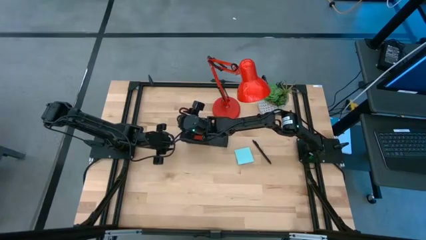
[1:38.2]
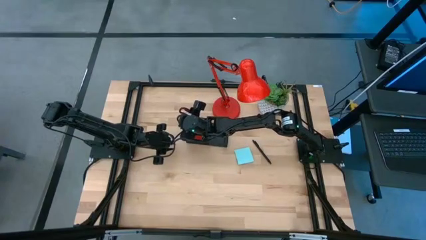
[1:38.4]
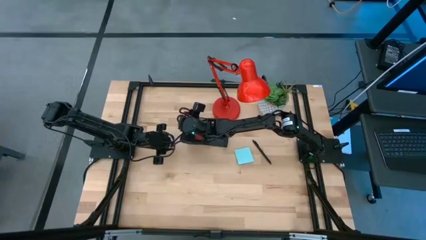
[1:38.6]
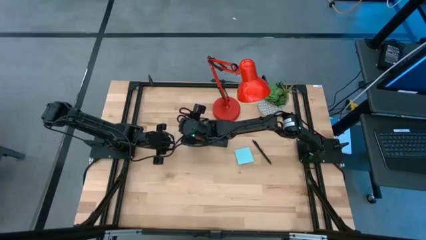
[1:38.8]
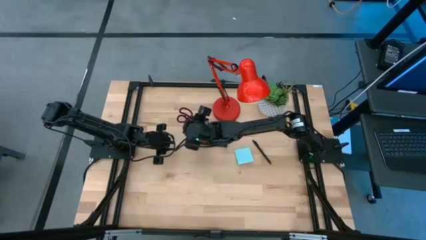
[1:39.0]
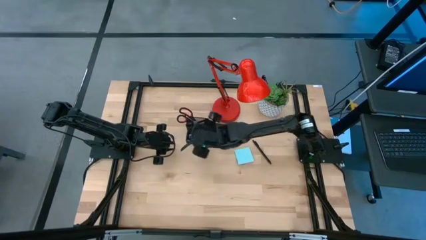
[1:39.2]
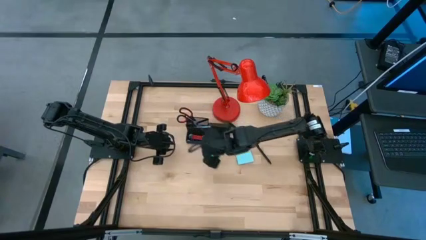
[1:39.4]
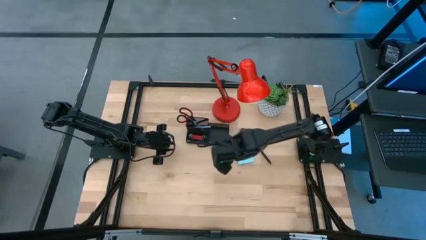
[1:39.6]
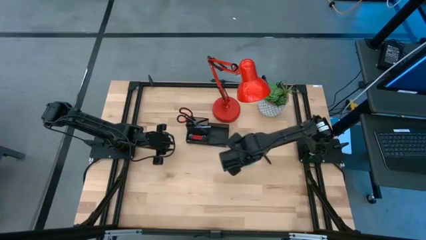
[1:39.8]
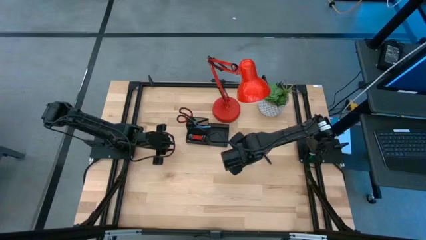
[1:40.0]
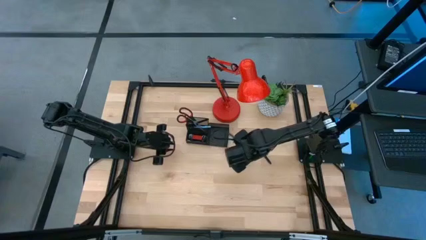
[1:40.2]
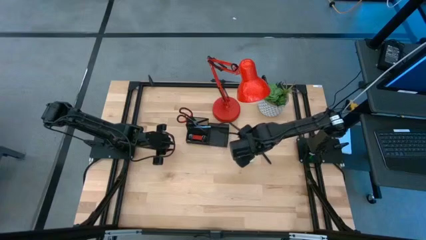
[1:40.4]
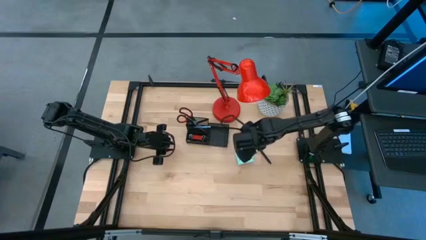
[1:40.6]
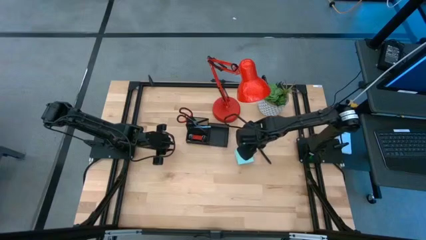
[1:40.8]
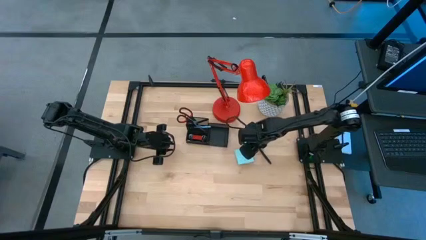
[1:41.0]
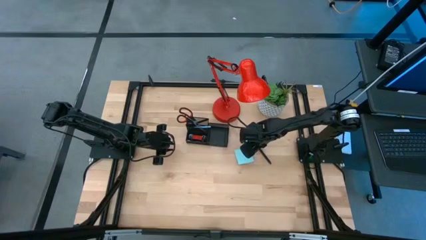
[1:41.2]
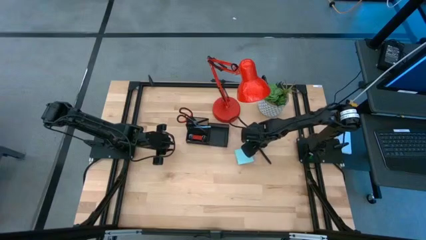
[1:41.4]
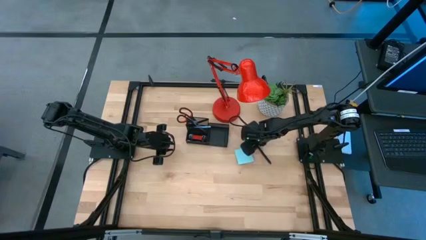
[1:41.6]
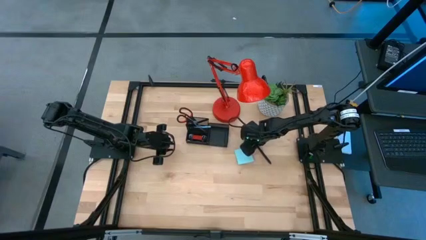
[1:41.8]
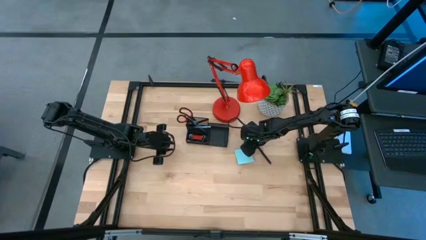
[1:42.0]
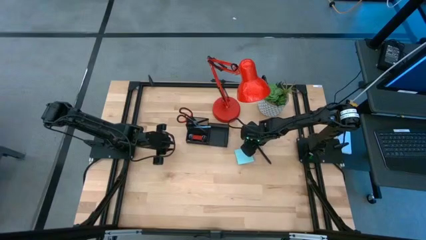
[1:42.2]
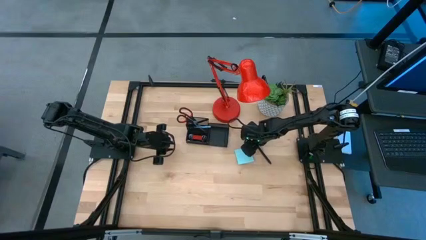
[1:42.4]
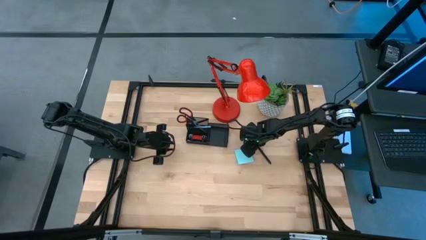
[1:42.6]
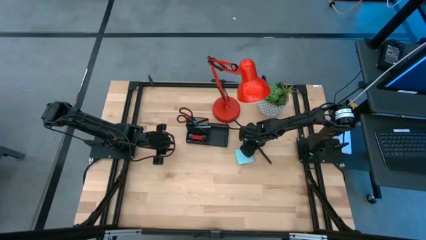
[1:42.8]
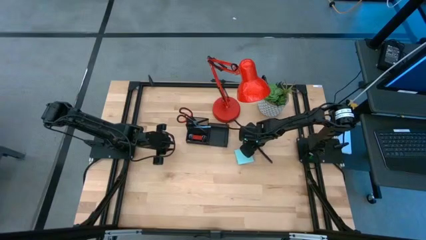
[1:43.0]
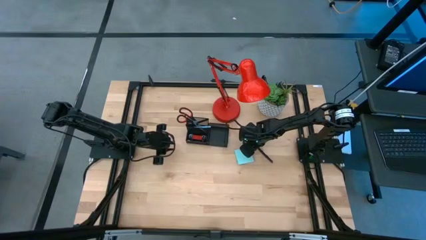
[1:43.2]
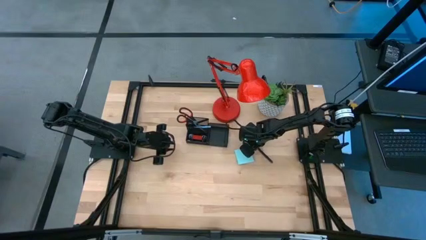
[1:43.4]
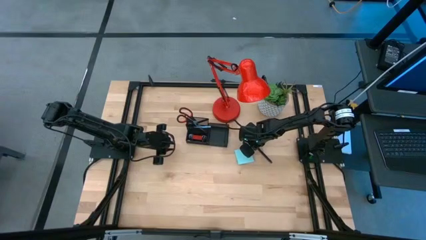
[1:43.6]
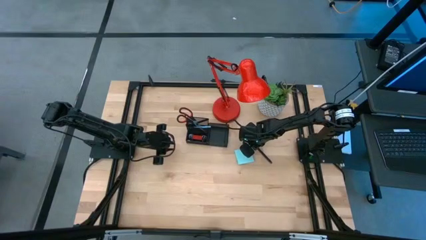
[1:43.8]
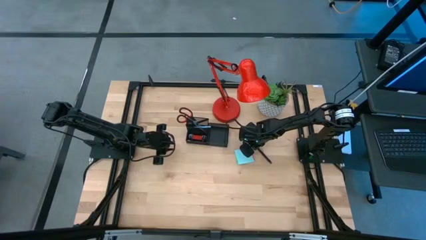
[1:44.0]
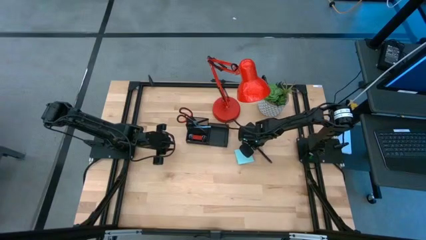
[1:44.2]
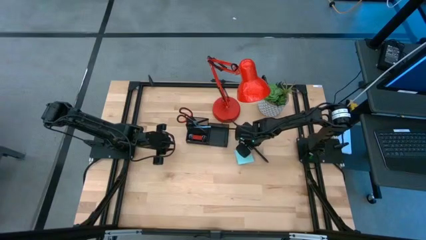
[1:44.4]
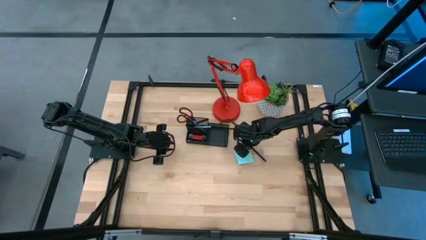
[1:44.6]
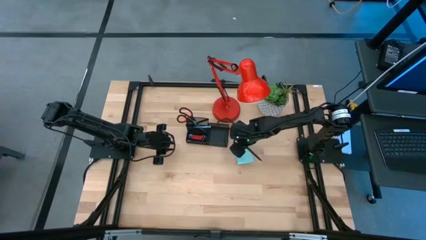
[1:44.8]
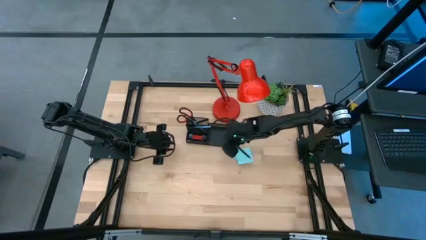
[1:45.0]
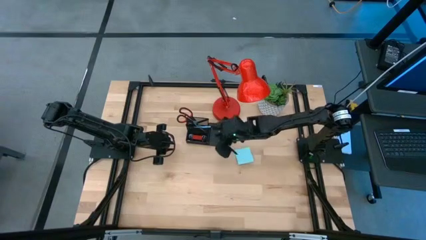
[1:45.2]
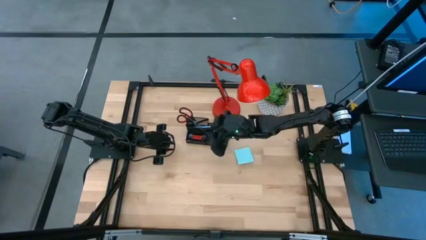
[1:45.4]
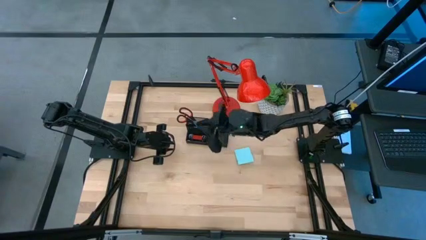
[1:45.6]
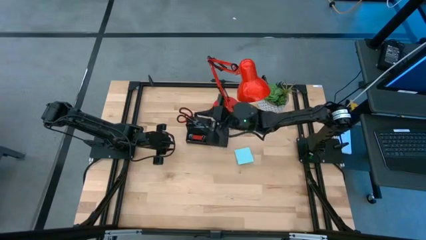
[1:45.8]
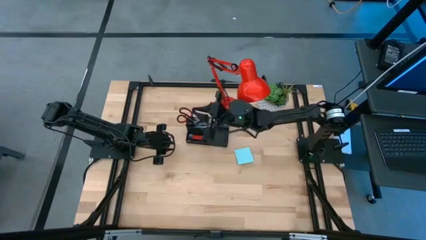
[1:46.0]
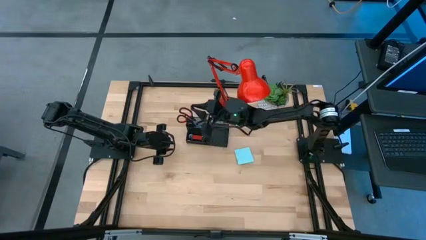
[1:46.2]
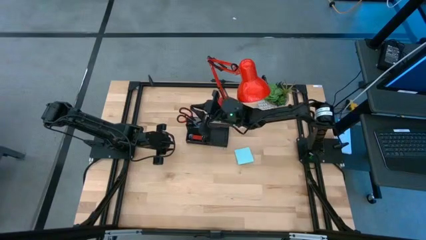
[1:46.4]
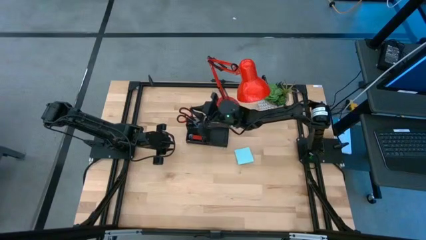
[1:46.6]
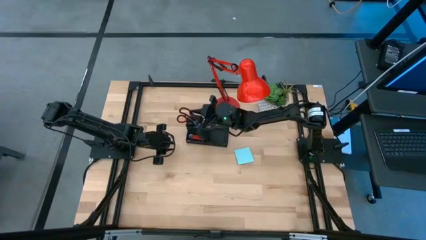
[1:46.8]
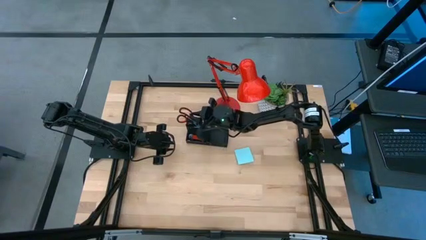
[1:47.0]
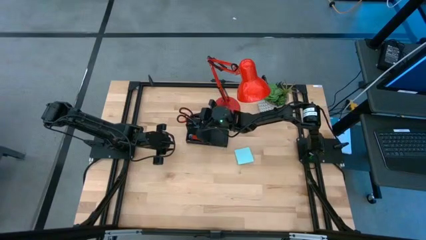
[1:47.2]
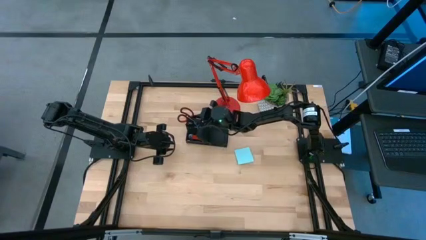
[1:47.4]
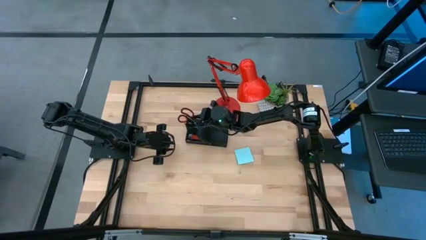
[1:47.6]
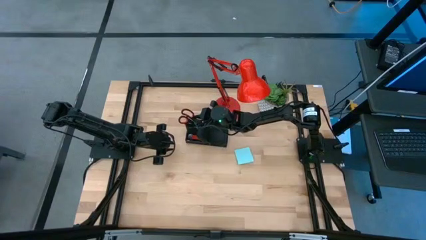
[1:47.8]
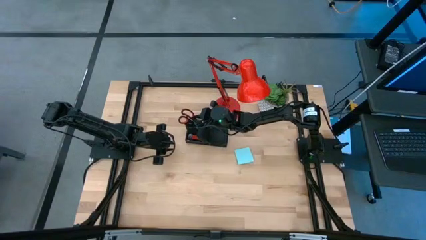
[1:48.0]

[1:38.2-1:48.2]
Task: Pick and place office supplies into organizer
Put the black pen into the black desk organizer

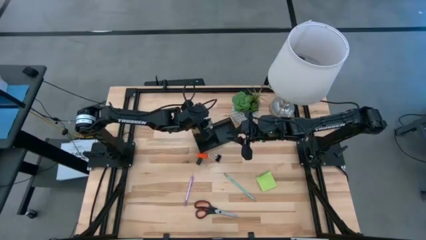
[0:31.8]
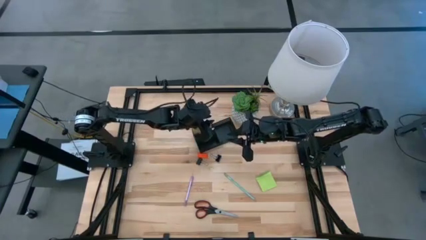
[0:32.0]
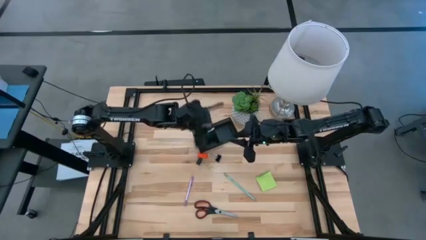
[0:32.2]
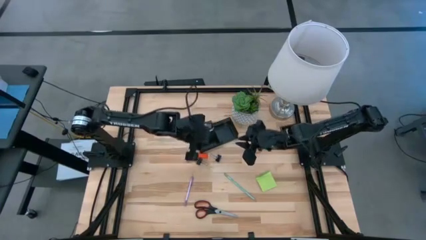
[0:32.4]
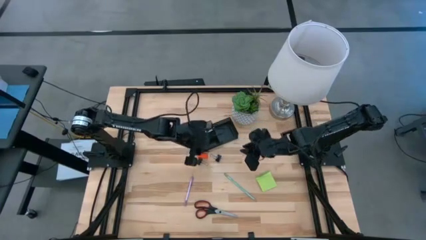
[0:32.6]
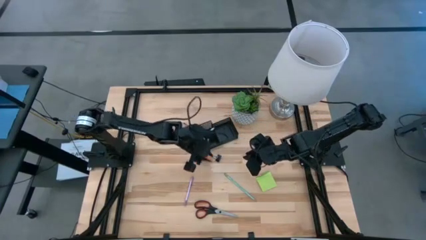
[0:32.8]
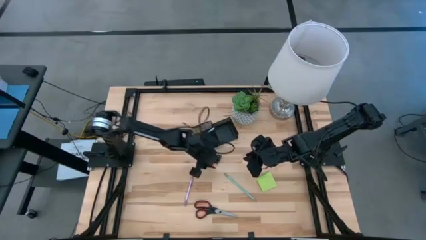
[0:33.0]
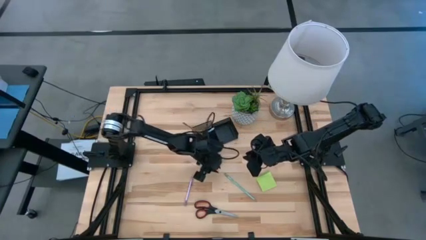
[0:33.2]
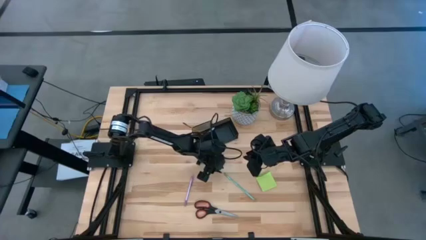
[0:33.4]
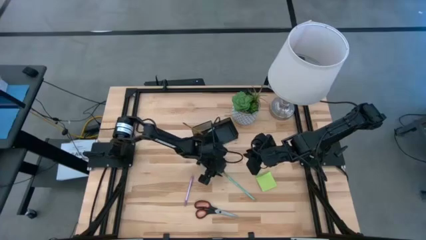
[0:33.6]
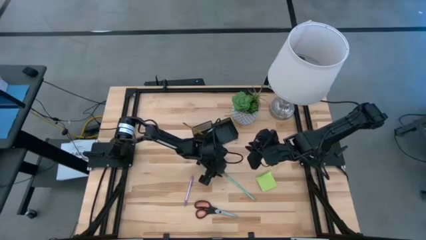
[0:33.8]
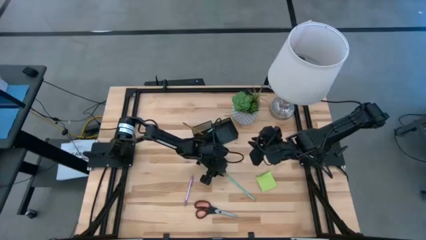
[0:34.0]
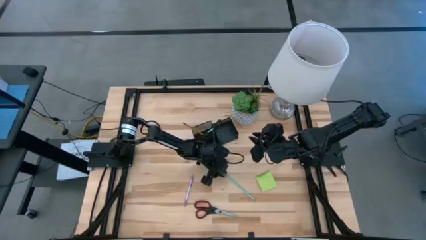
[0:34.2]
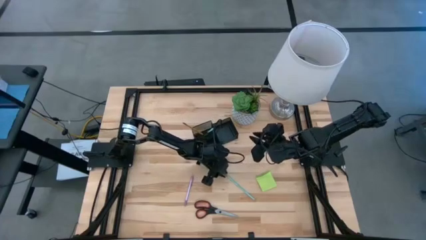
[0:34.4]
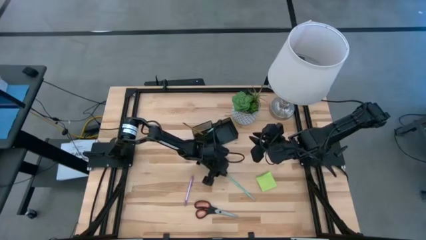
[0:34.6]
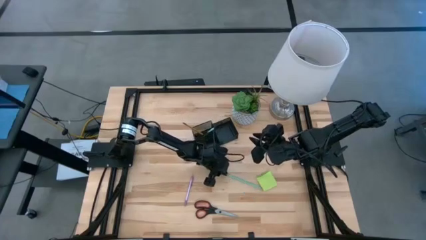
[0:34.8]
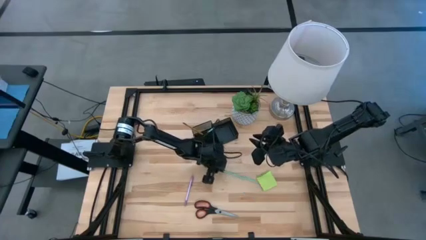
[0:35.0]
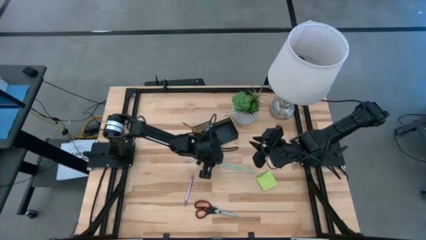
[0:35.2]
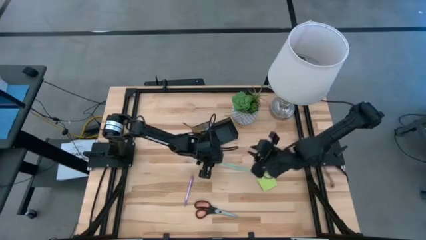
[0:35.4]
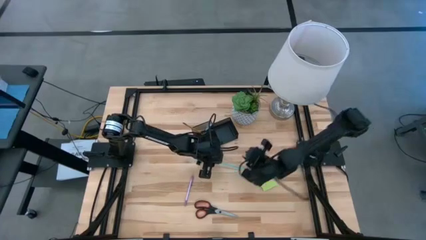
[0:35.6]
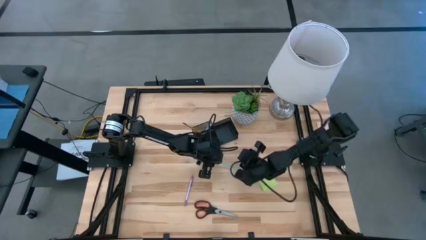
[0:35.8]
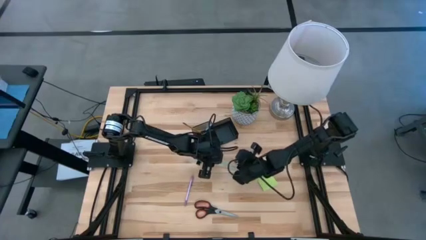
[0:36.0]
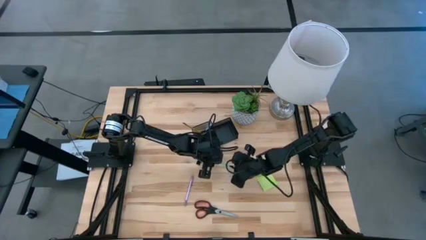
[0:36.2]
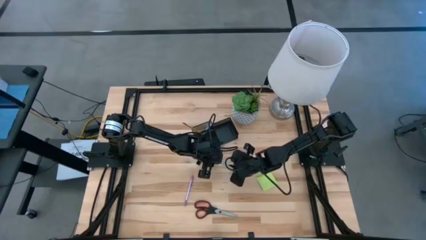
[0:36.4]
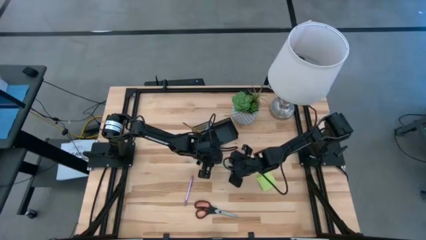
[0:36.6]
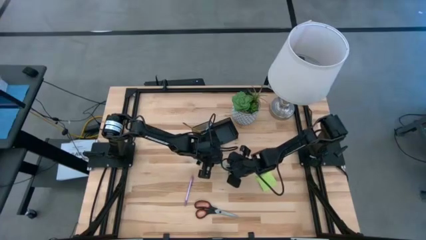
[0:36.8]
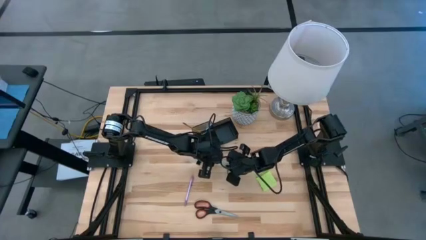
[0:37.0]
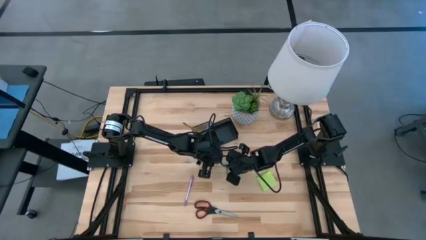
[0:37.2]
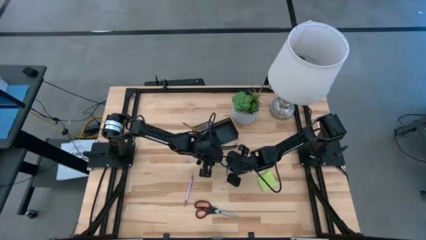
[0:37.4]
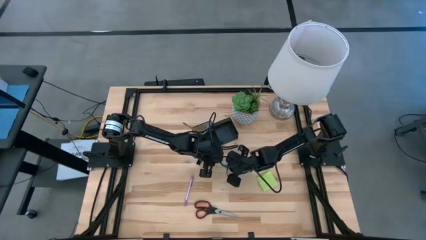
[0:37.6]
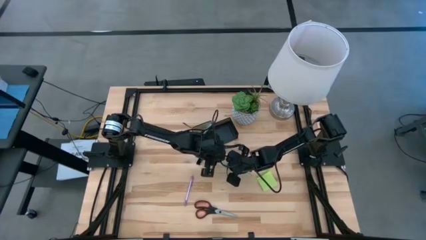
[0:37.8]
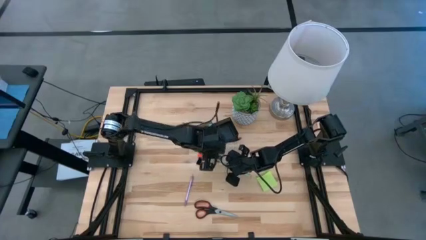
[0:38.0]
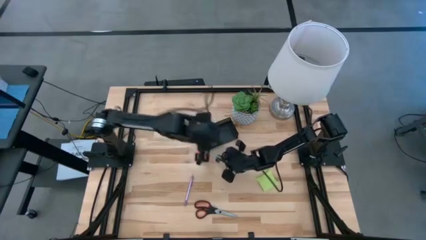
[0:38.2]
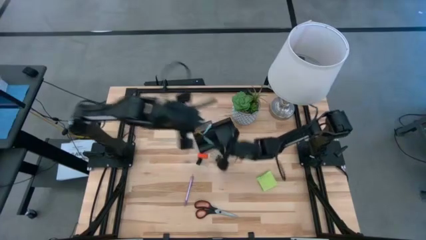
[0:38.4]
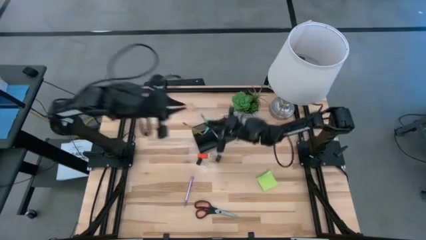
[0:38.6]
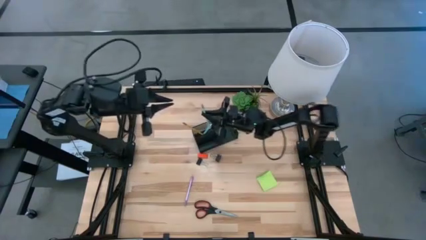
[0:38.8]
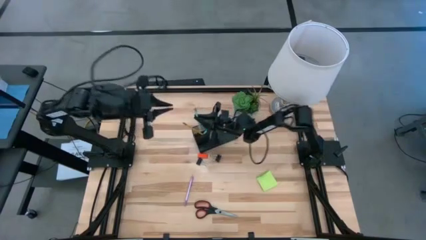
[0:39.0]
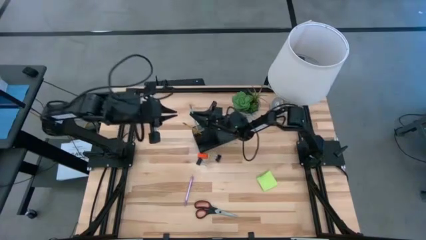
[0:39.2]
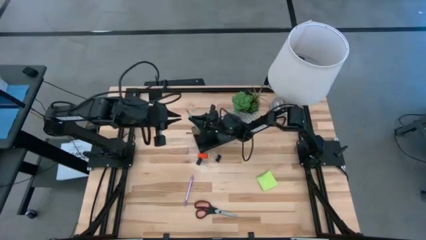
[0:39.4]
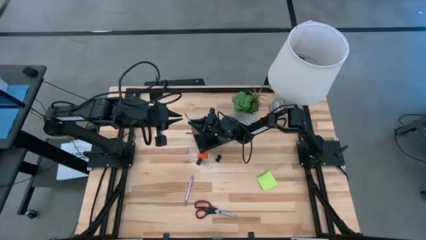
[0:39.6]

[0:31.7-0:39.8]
Task: Pick and place office supplies into organizer
Put the blue pencil into the black desk organizer
